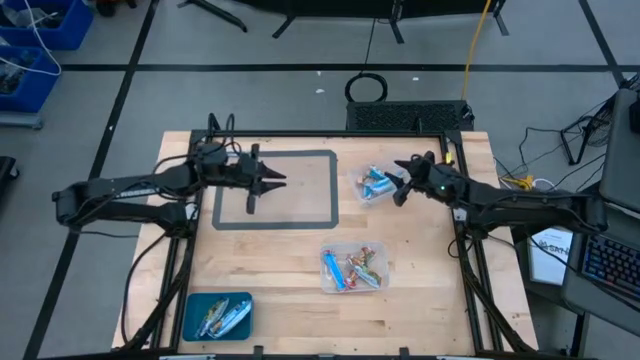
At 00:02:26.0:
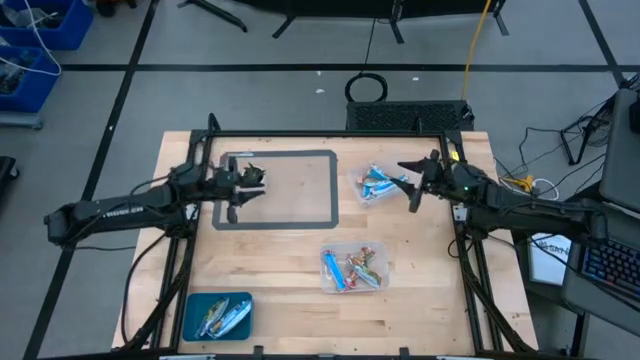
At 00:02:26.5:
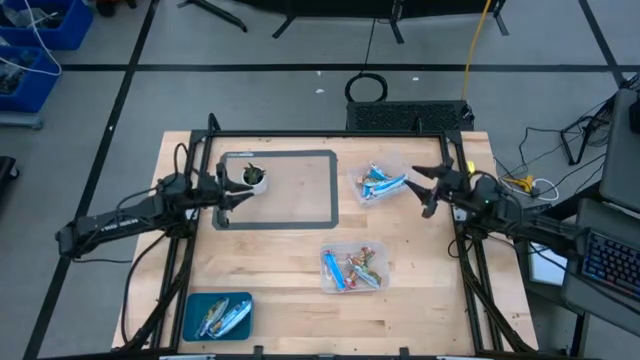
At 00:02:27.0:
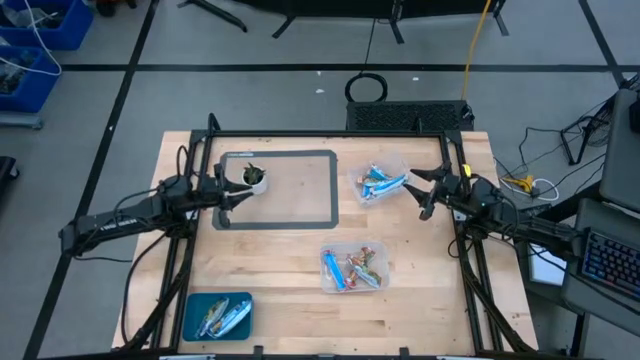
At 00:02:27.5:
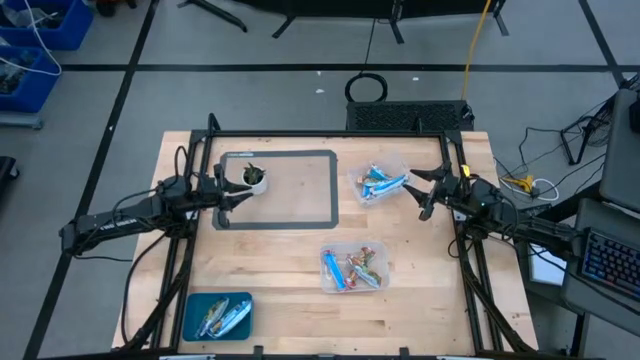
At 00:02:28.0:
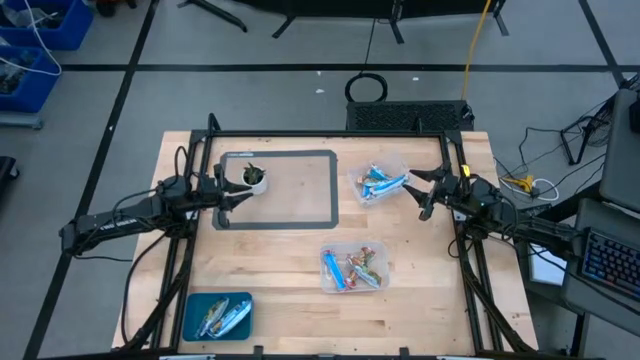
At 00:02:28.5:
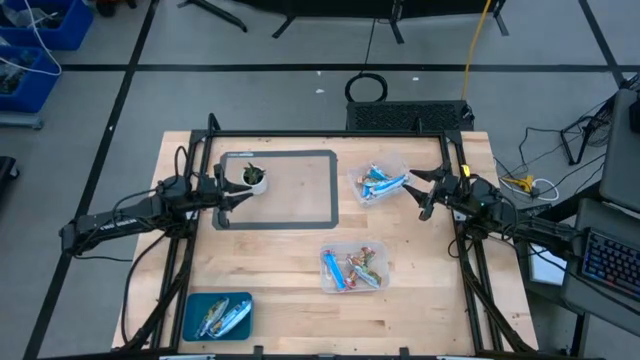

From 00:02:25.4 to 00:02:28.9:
Task: Pick and place Granola Bars by type
Return to Home Position

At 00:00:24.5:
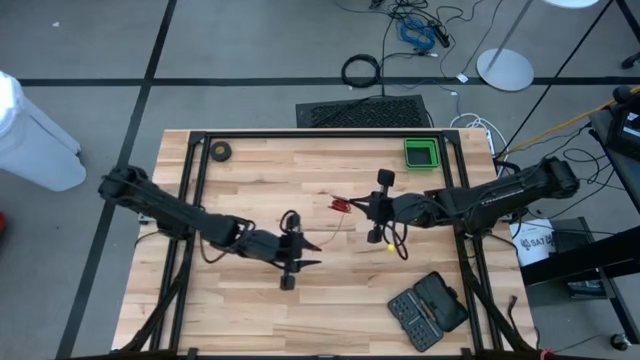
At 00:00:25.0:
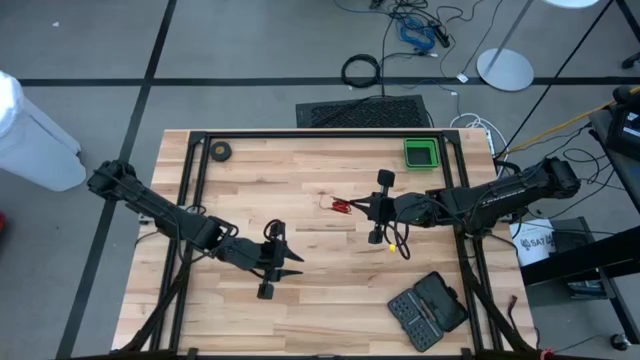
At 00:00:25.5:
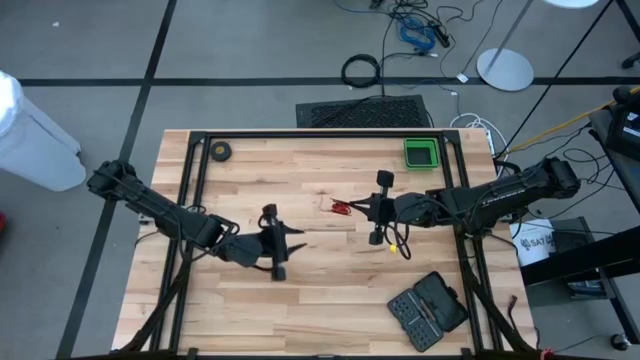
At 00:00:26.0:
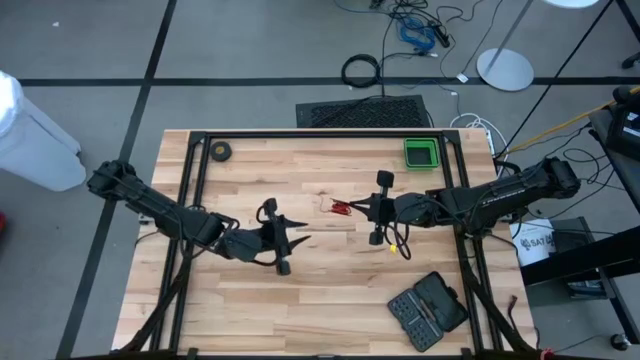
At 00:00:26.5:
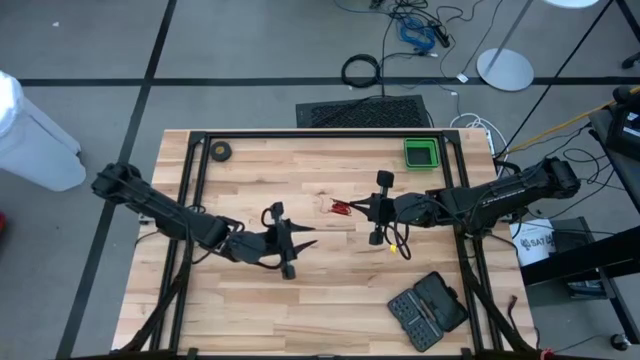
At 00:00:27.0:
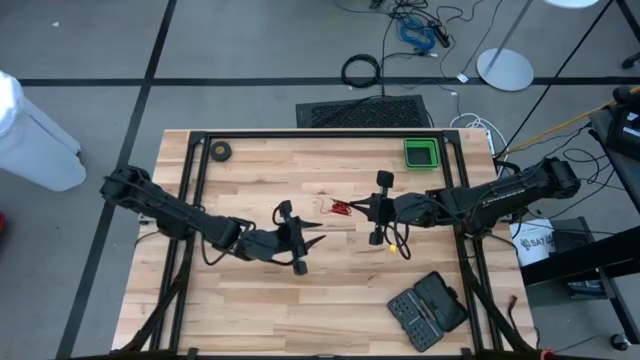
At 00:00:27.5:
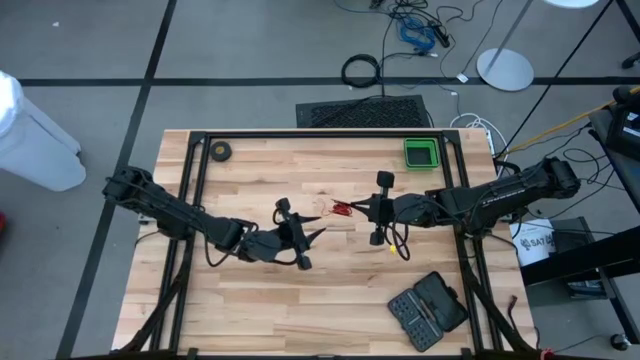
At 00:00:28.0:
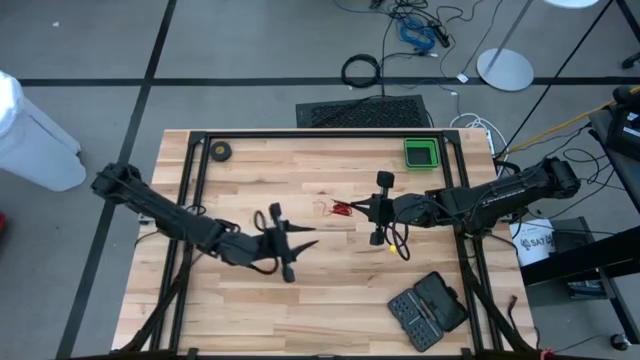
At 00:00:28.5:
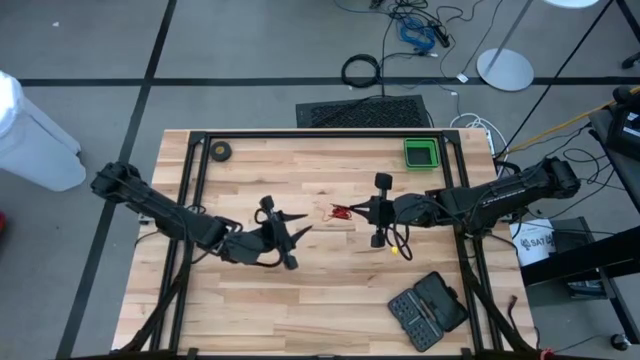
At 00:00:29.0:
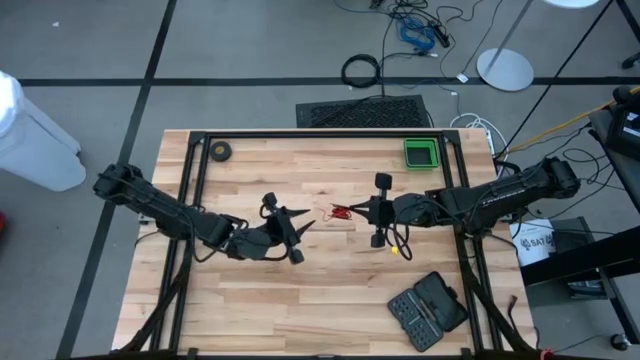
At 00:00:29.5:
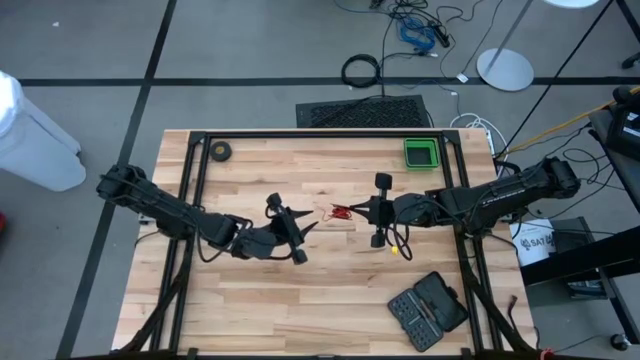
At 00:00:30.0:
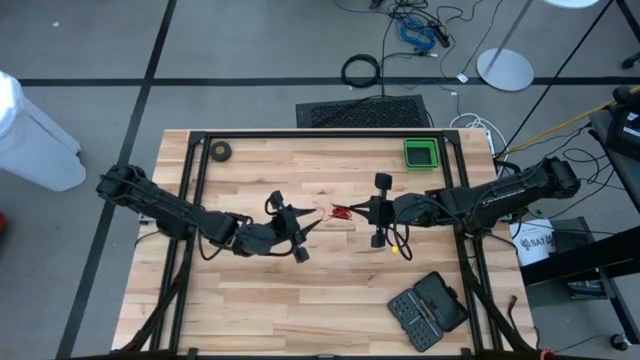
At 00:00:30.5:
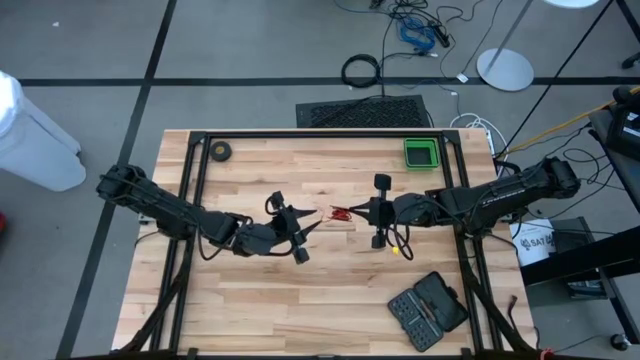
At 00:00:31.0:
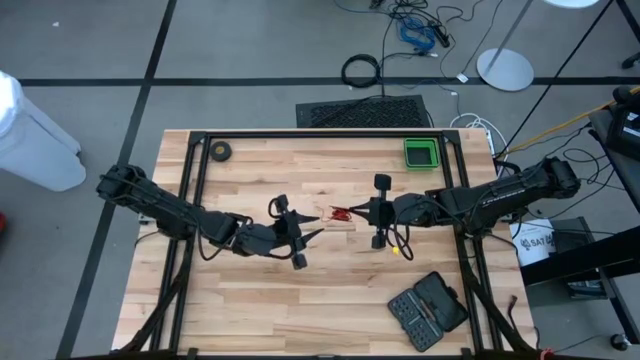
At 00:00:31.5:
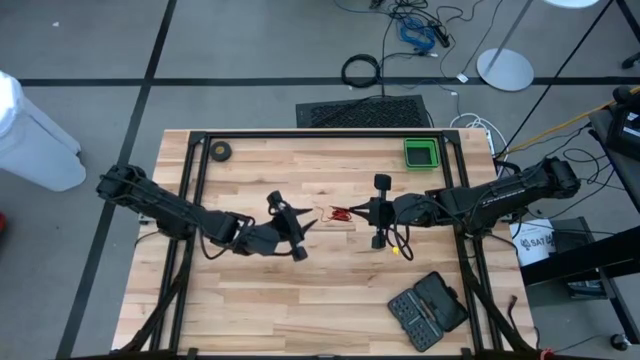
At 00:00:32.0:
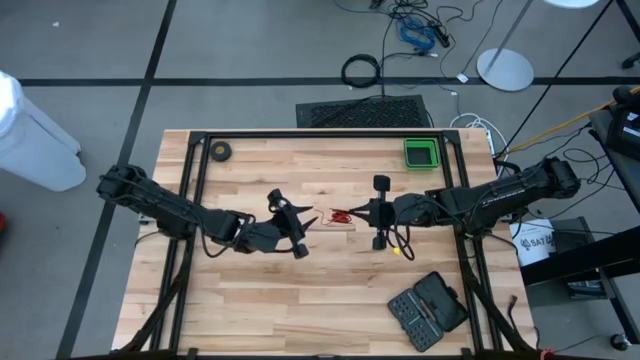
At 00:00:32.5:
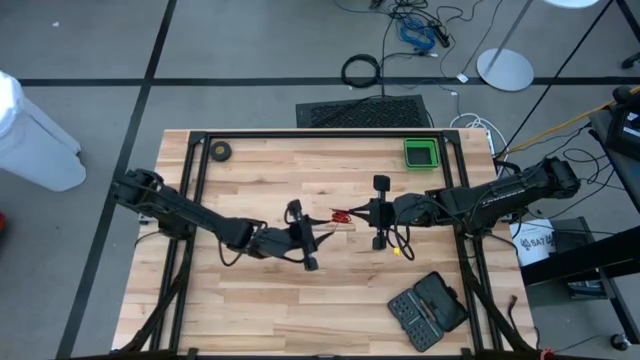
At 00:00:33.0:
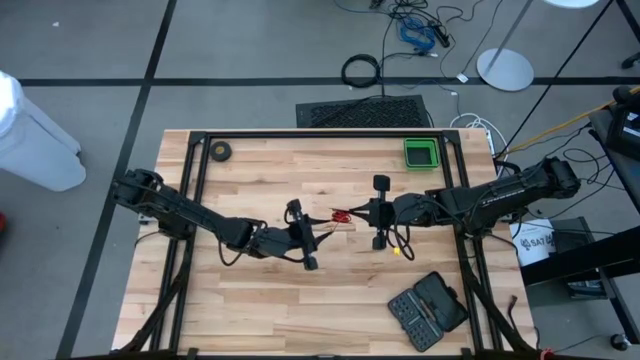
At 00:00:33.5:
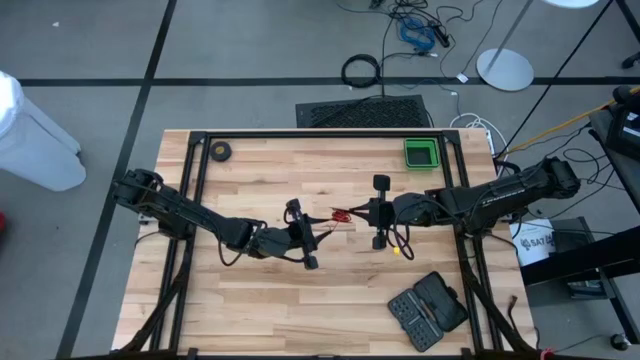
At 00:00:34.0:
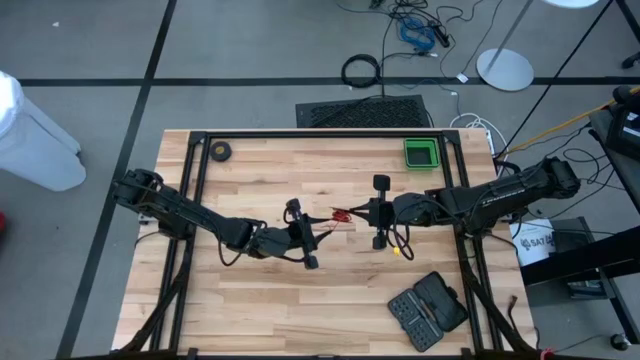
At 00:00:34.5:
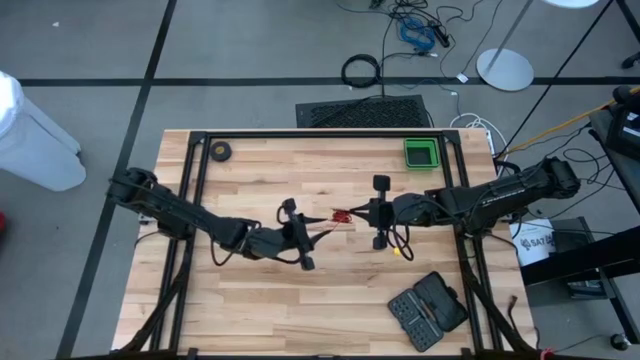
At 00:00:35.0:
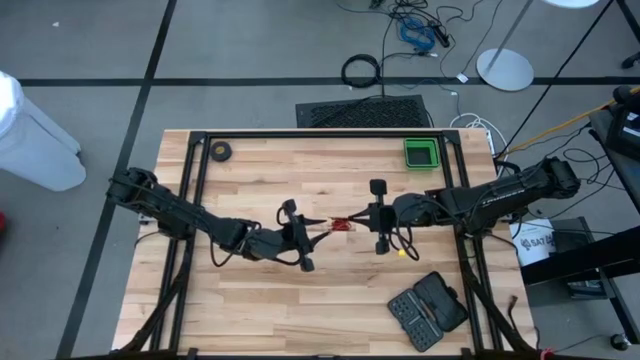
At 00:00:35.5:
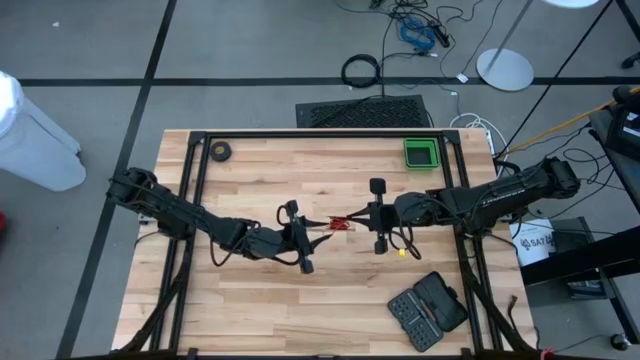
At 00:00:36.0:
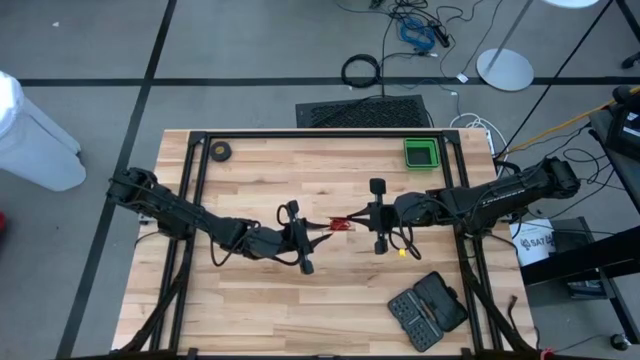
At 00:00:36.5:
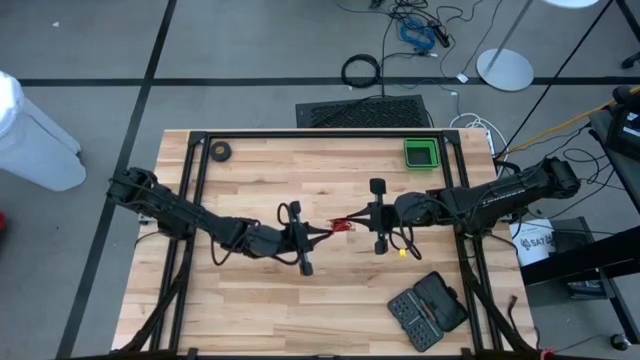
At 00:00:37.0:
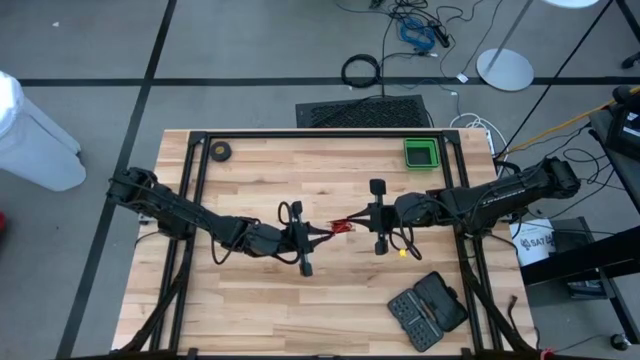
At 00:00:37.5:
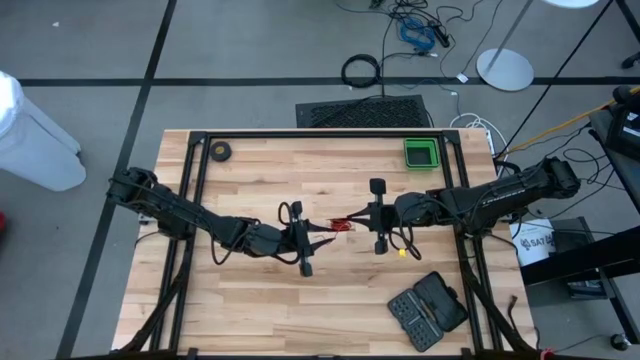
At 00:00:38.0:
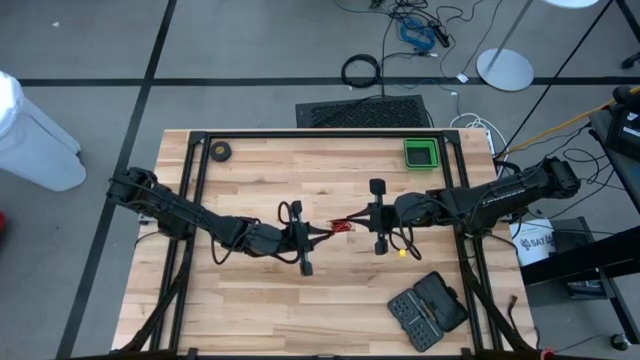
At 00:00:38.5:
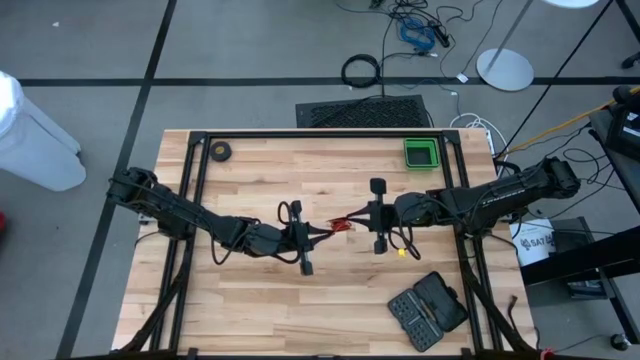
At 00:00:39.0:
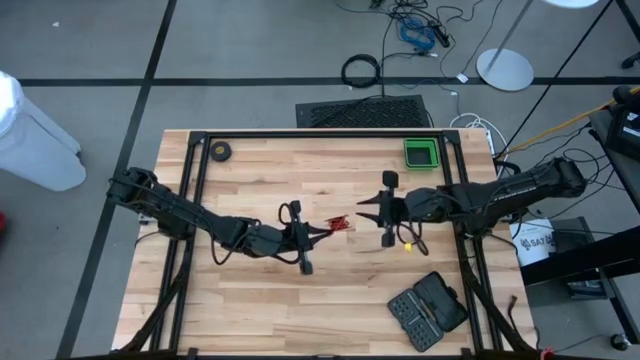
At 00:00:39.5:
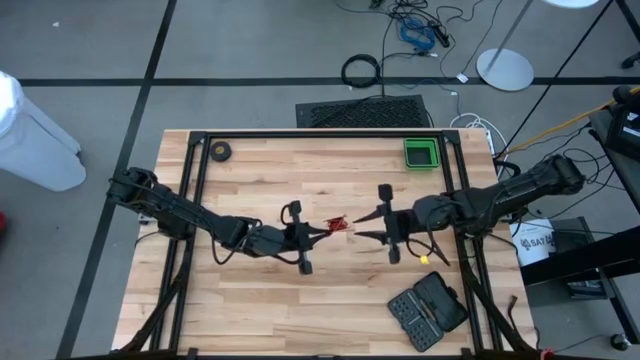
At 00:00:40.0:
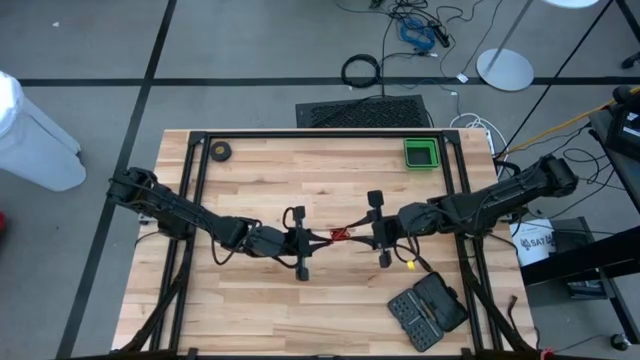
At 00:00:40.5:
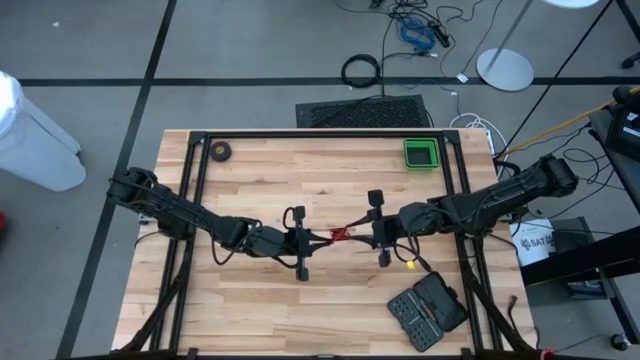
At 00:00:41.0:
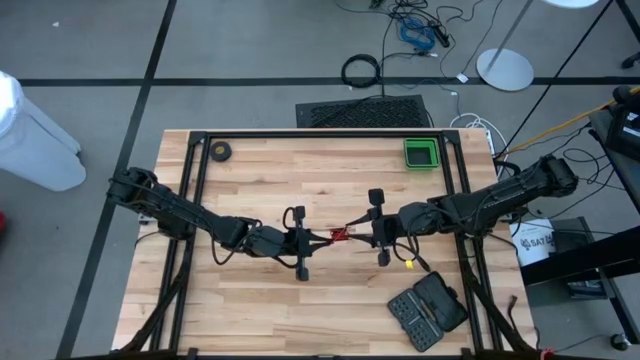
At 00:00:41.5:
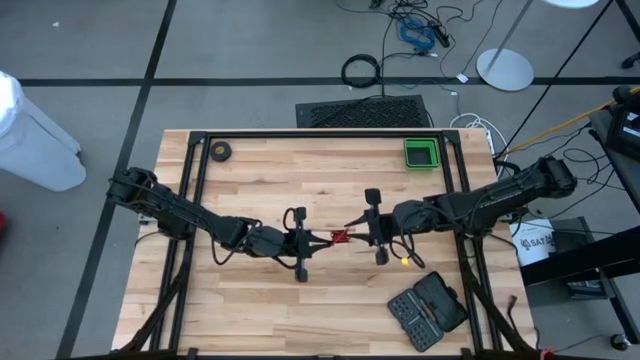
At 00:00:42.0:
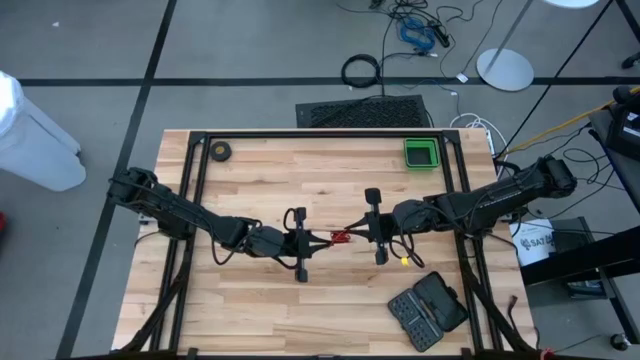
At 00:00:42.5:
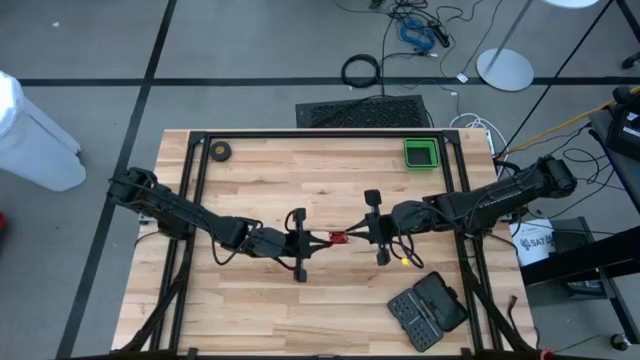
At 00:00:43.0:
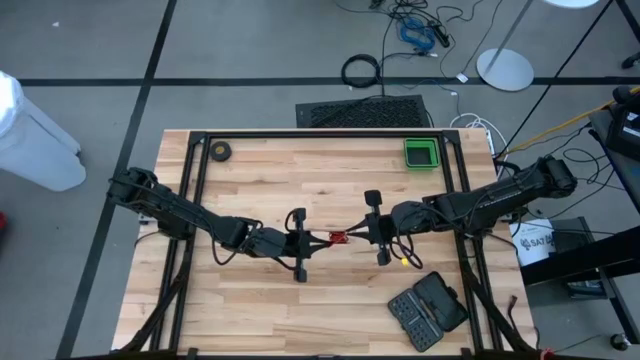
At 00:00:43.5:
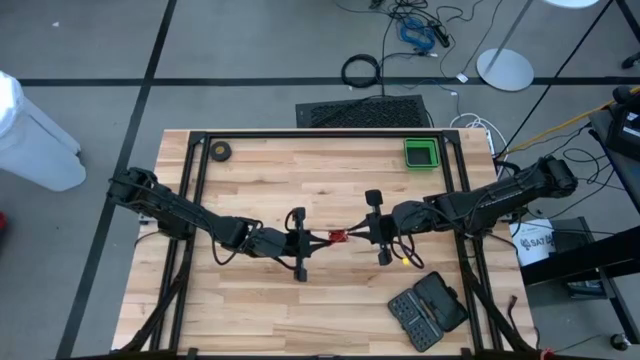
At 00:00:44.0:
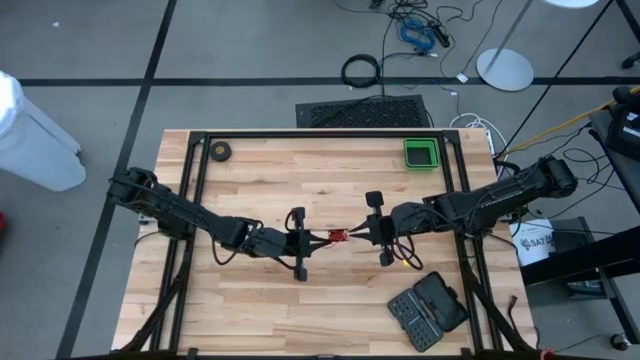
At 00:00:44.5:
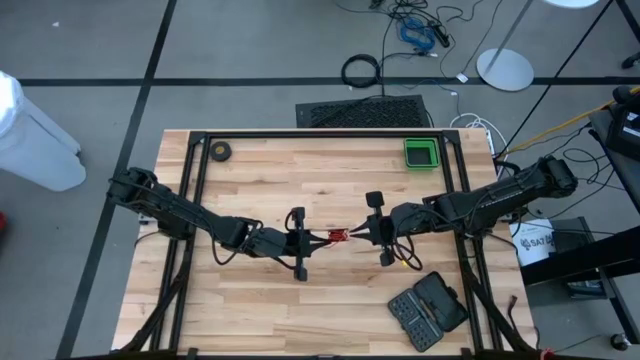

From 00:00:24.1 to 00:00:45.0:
Task: Coil cords
Uncoil the red wire from the spool
